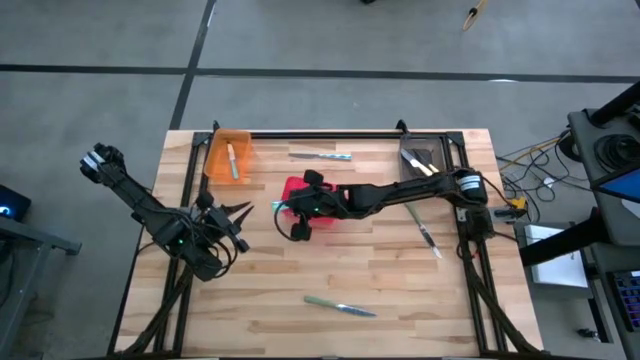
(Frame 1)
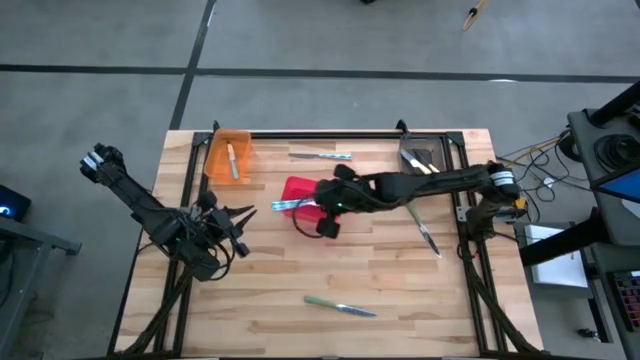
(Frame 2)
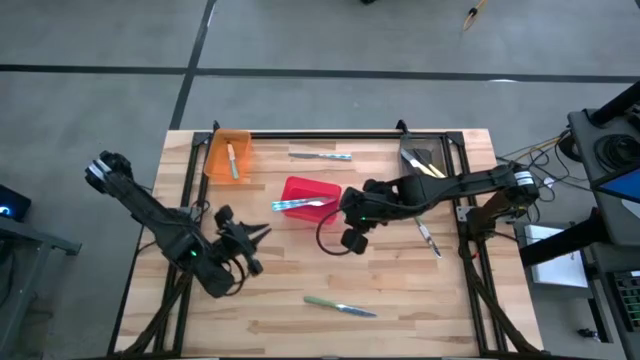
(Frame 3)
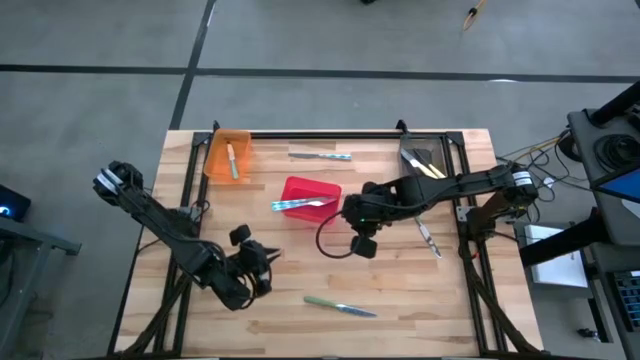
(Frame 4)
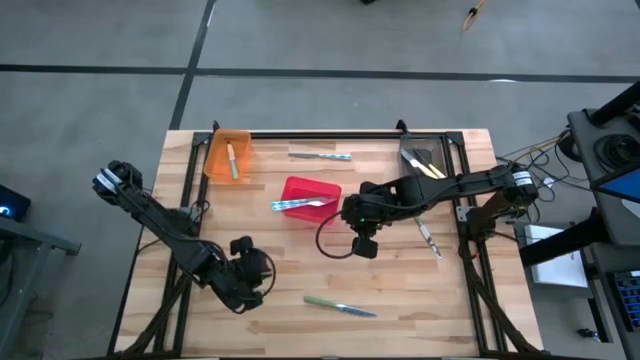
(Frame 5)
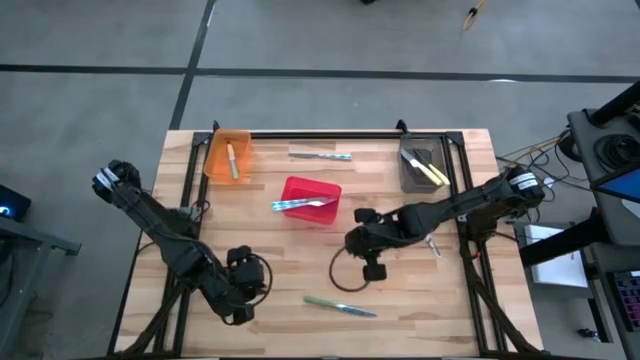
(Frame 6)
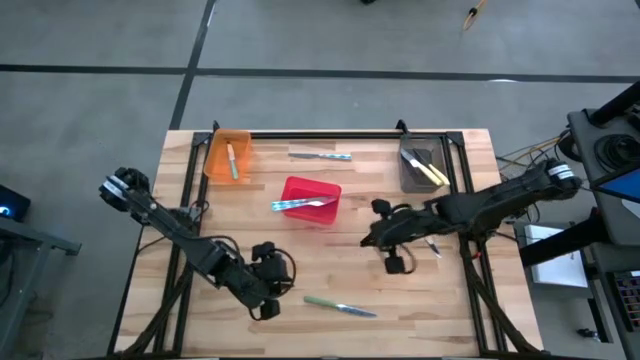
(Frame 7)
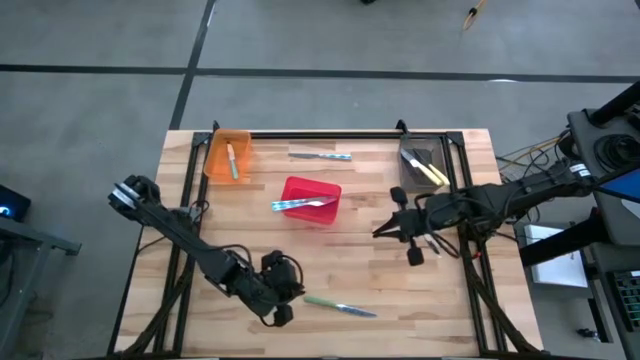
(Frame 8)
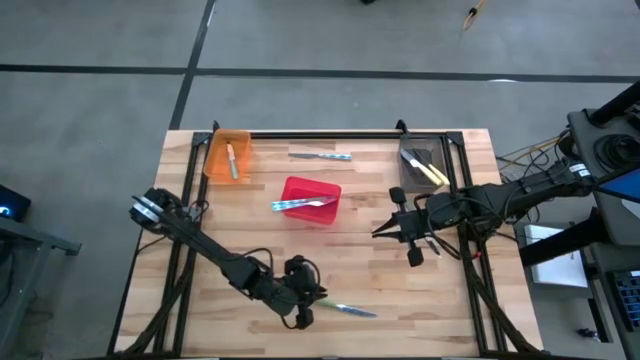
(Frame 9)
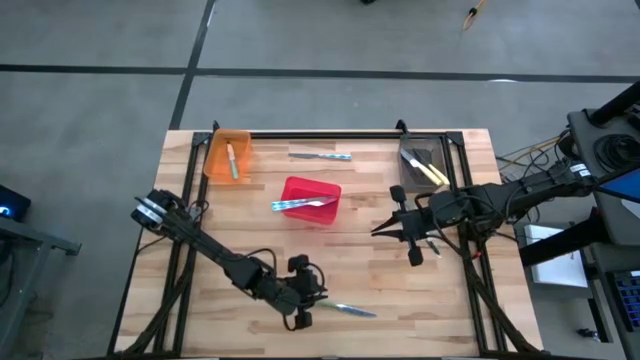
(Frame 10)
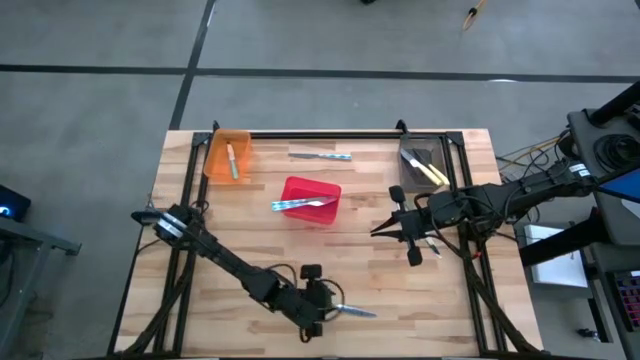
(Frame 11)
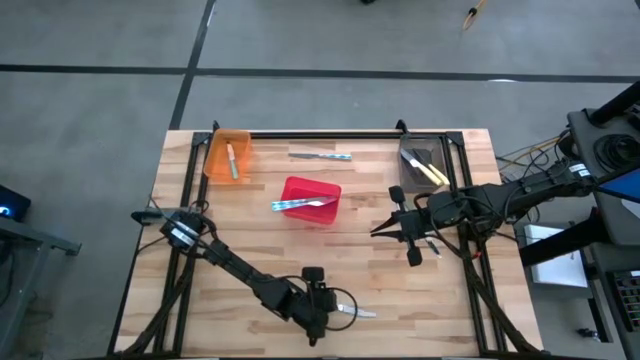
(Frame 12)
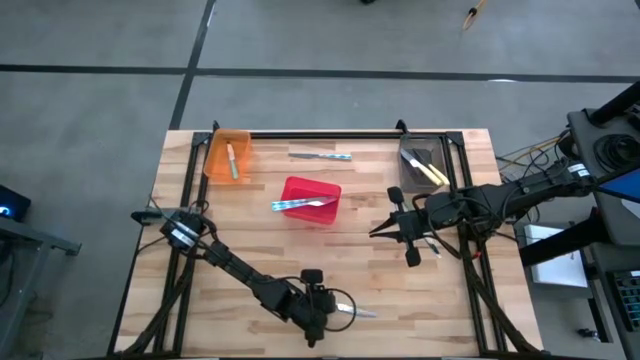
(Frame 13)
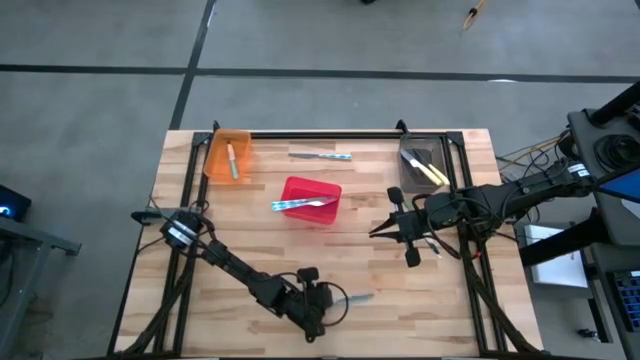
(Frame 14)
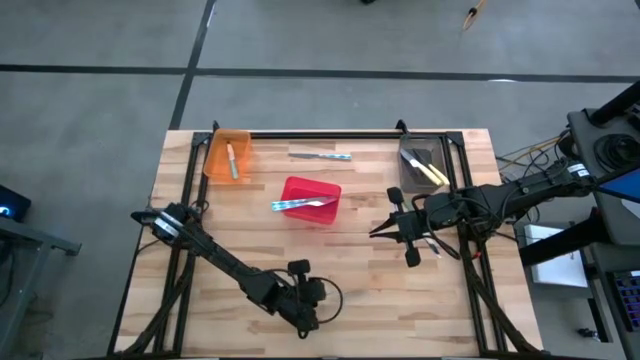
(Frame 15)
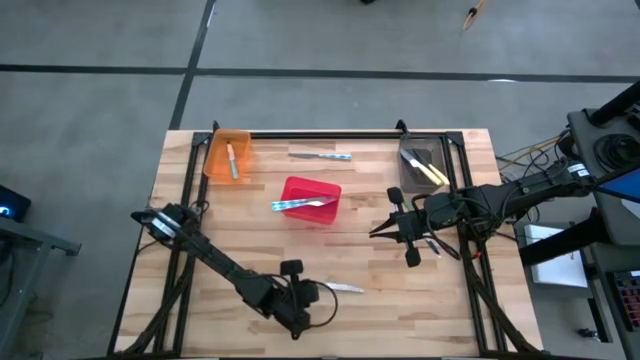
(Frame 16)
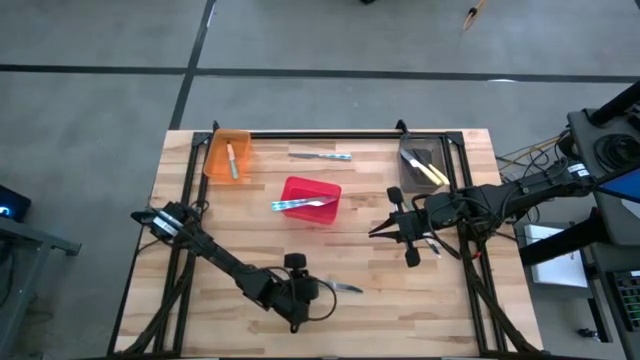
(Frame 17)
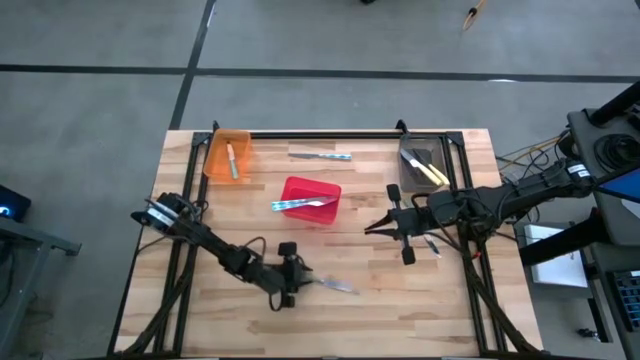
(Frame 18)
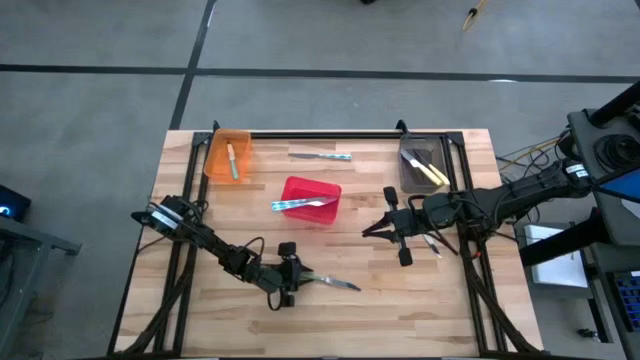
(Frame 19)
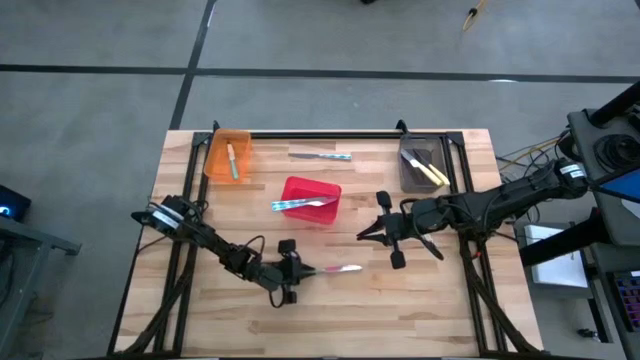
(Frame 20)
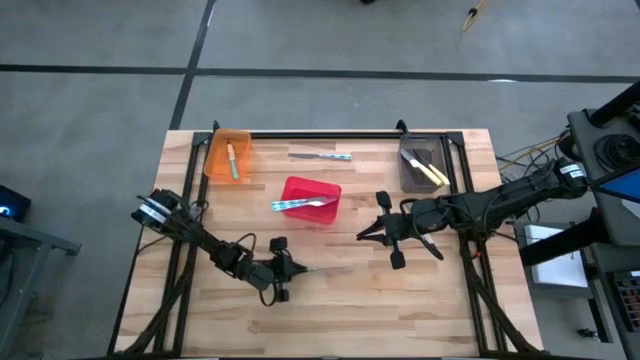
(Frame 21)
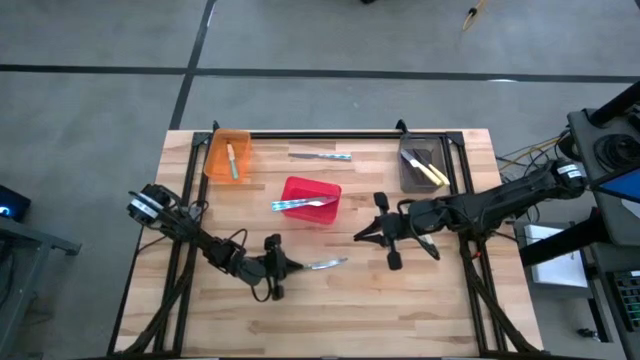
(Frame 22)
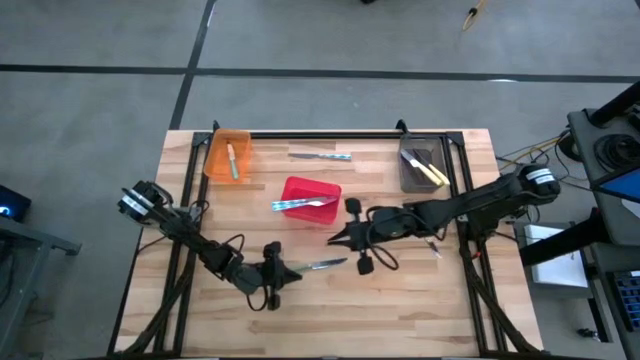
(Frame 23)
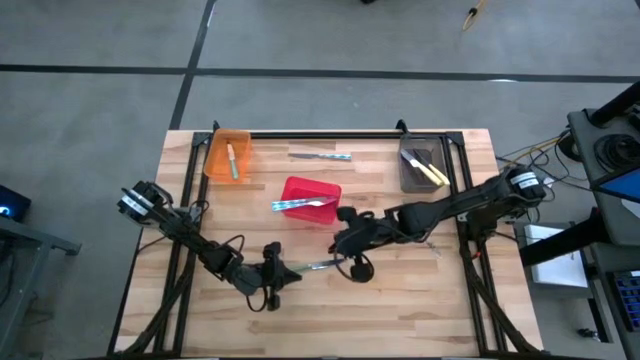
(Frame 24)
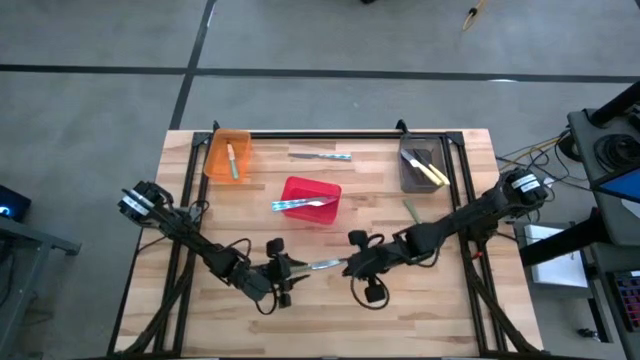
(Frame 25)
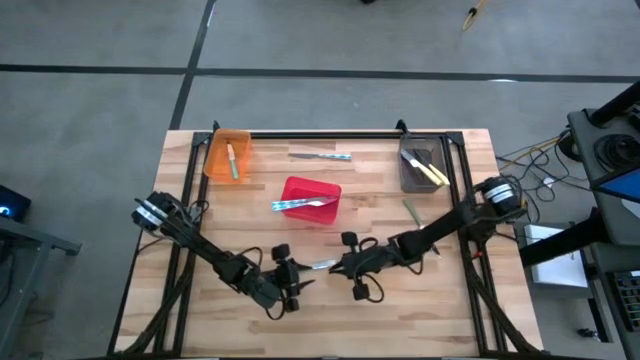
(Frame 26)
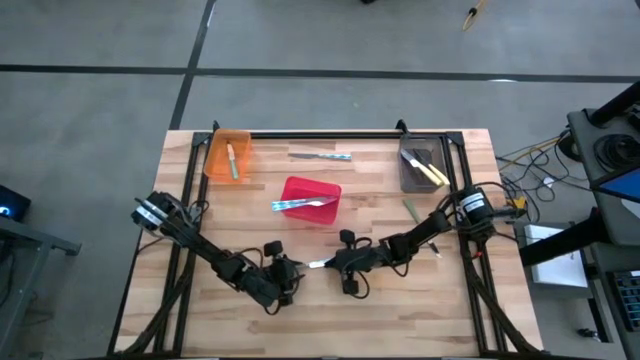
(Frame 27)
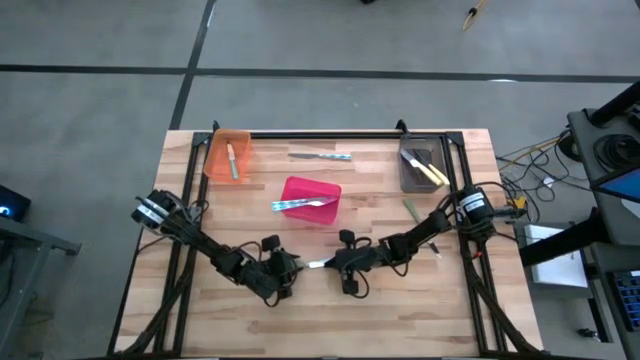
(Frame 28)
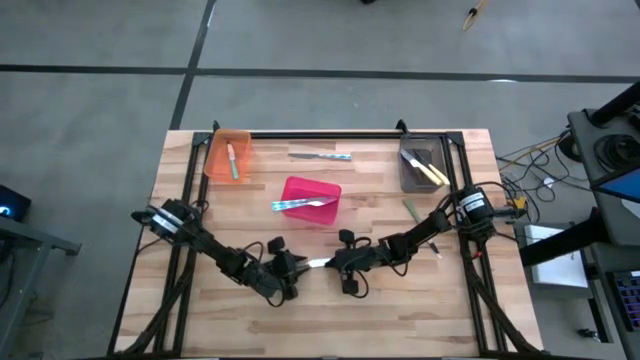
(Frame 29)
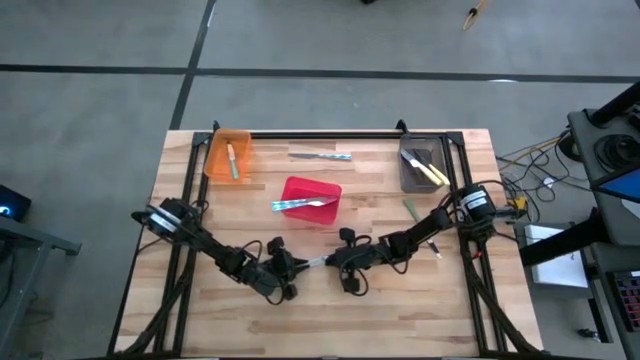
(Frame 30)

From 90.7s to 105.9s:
Task: Sort silverware by color (type)
Put the bottom green table knife into the orange bin

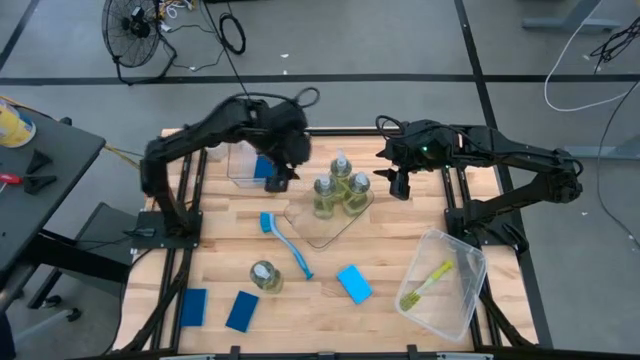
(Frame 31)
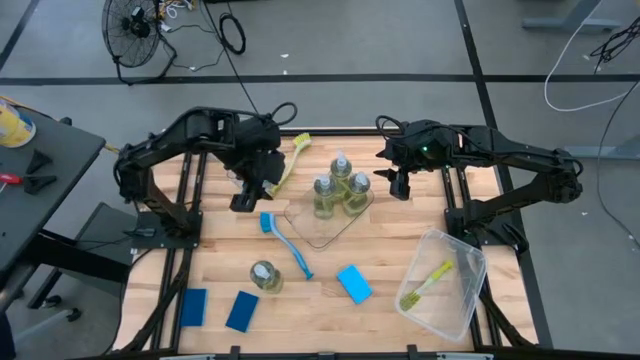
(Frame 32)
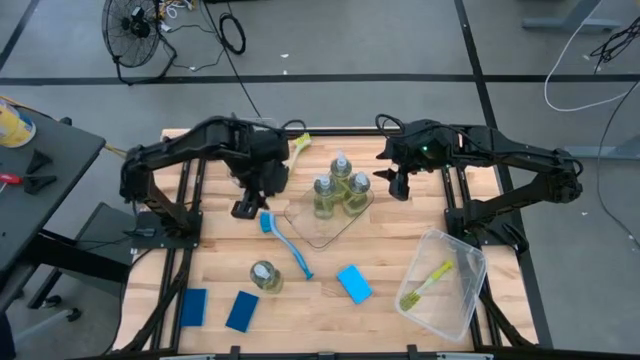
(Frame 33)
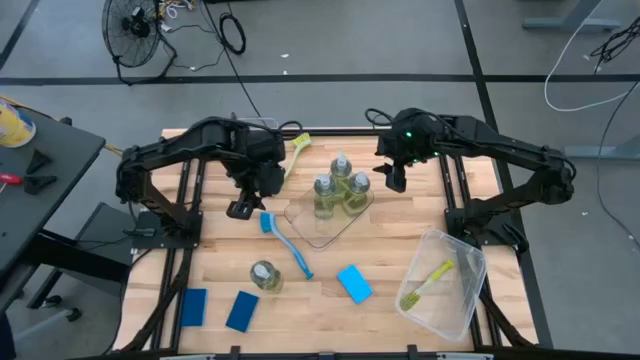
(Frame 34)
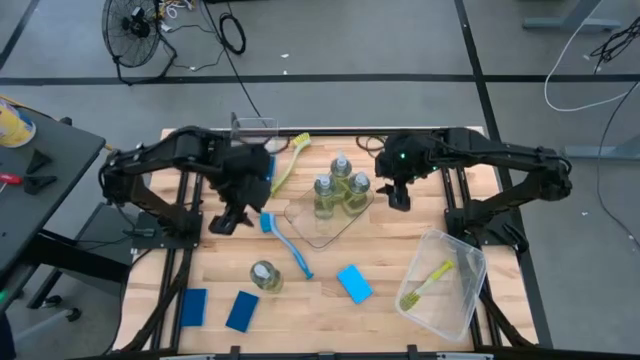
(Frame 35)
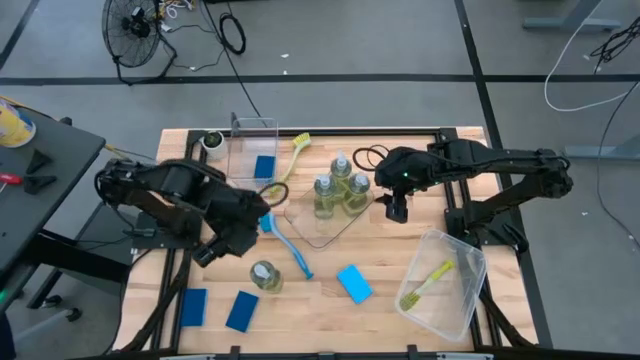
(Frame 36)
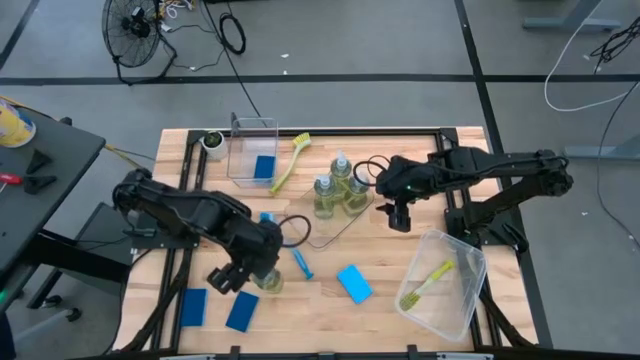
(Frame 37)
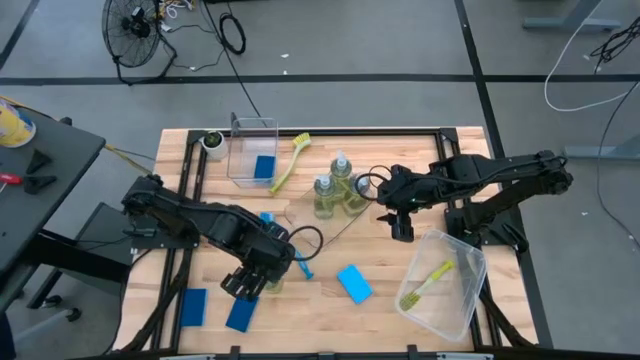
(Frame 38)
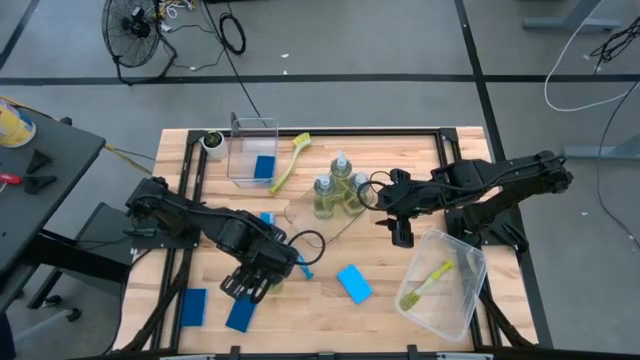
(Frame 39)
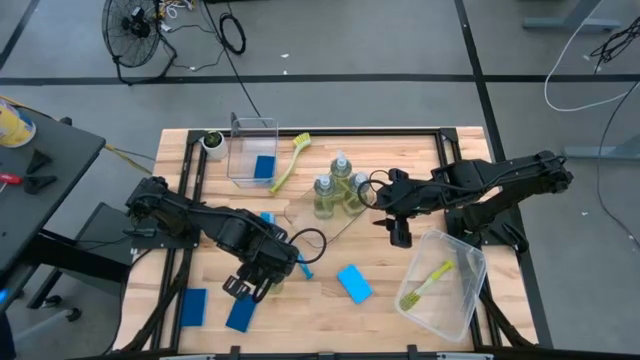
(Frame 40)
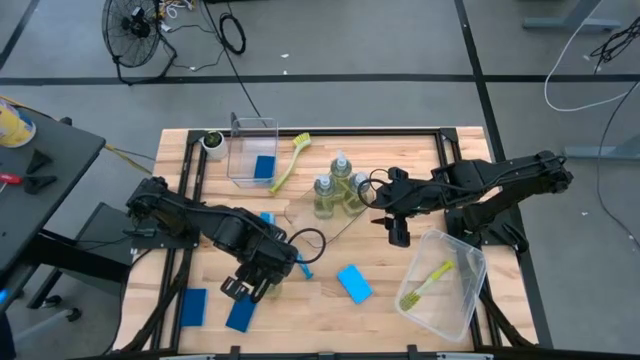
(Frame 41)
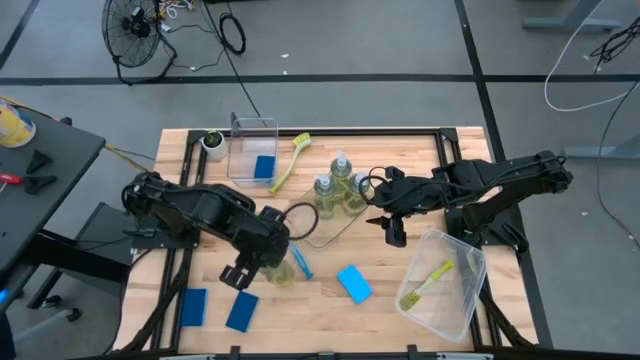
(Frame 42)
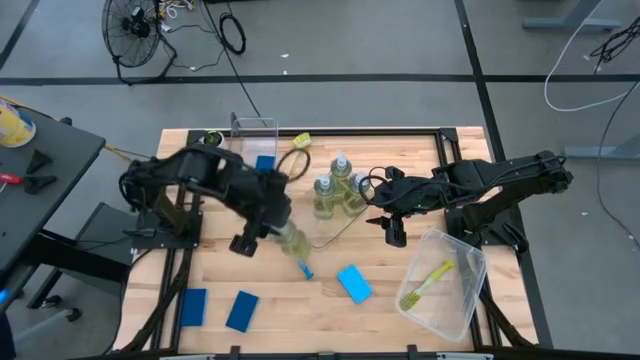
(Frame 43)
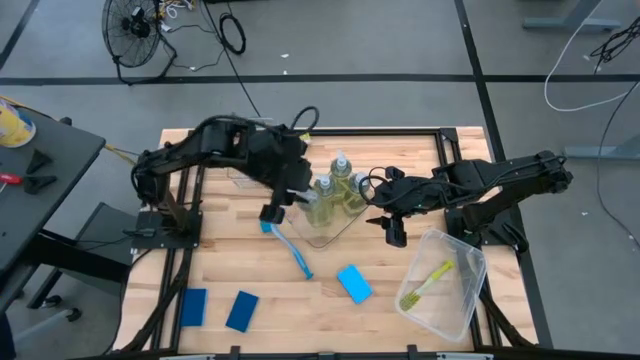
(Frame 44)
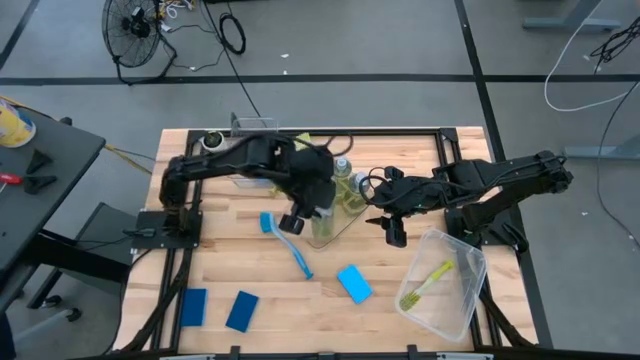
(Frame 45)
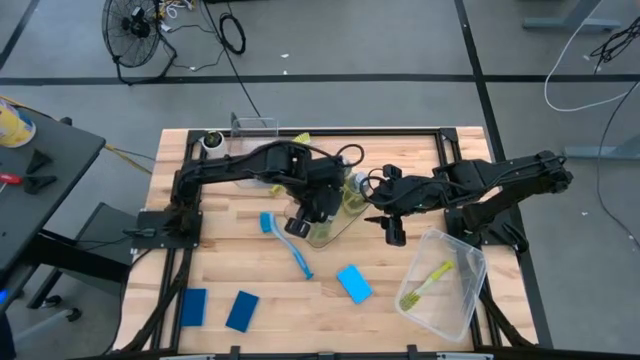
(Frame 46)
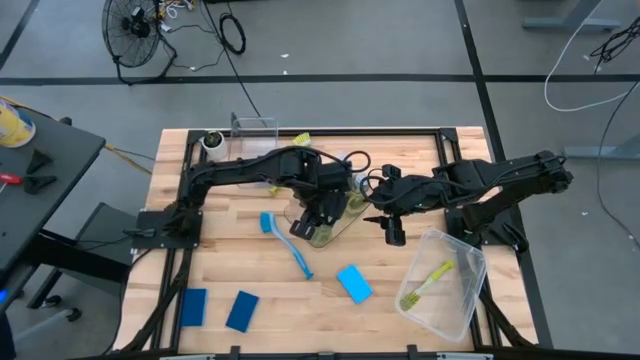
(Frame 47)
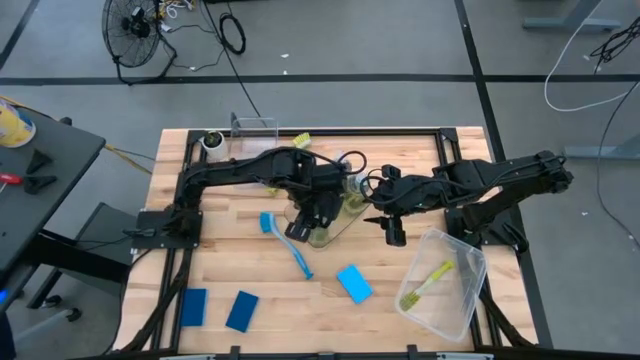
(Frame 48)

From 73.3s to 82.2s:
Task: Pick & Place Kitchen Sink Supplies
Put the dishwashing liquid bottle into the bottom transparent bin
